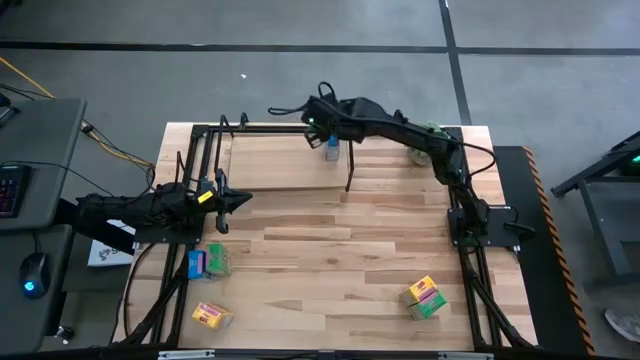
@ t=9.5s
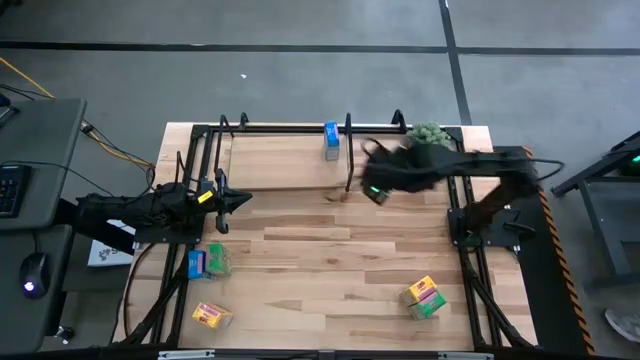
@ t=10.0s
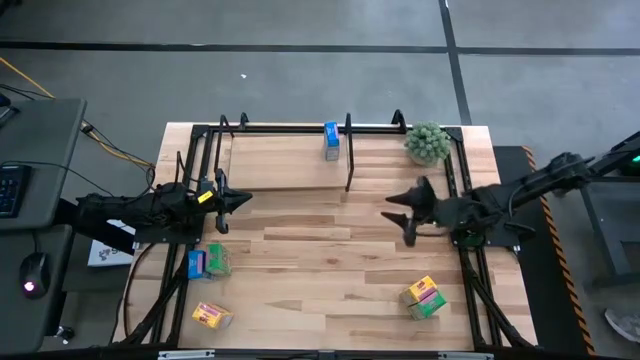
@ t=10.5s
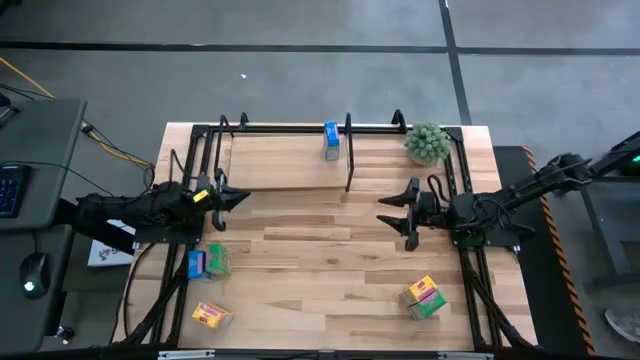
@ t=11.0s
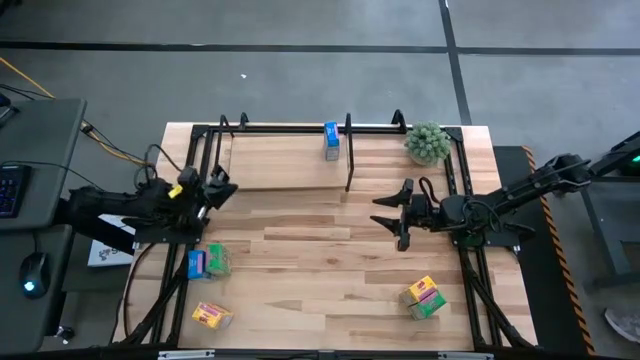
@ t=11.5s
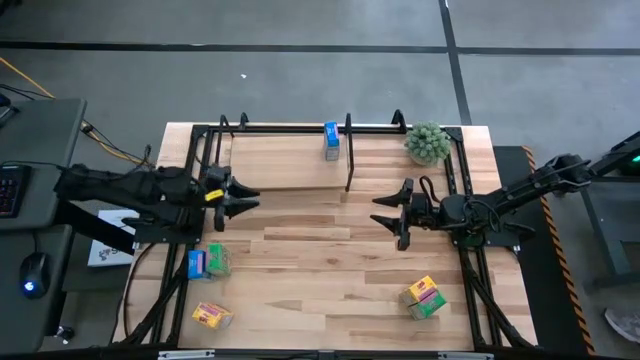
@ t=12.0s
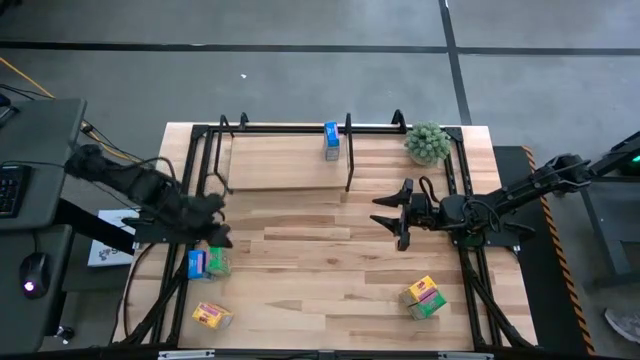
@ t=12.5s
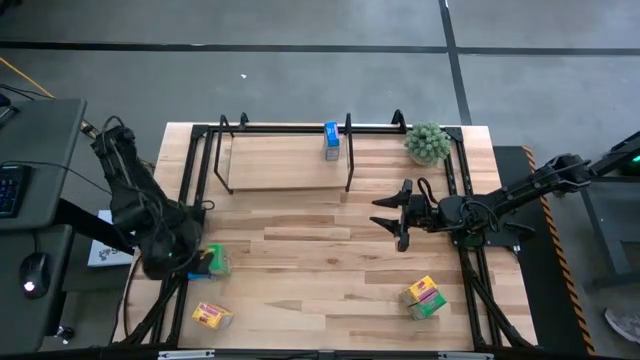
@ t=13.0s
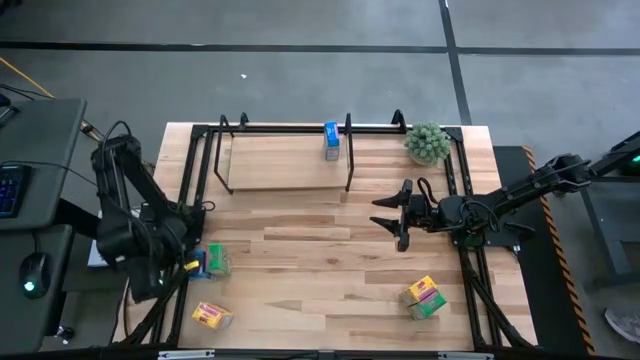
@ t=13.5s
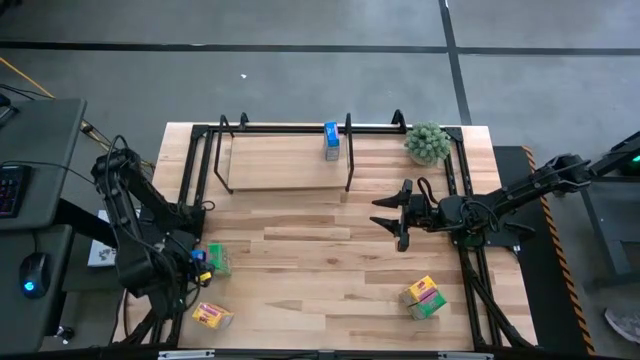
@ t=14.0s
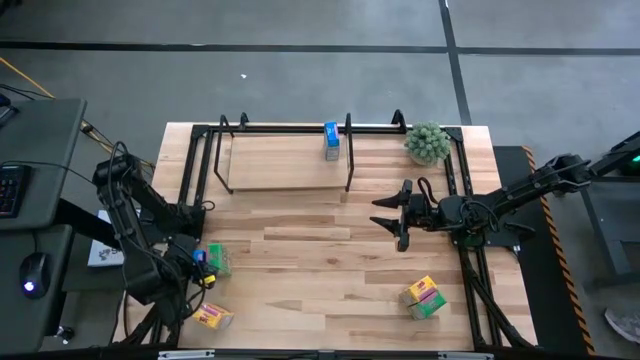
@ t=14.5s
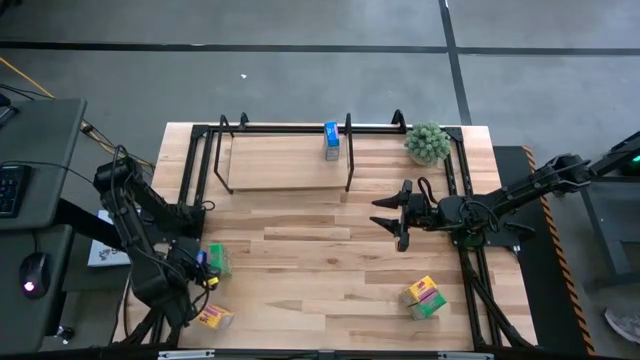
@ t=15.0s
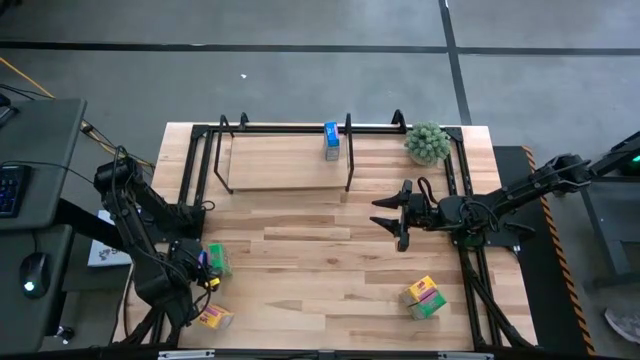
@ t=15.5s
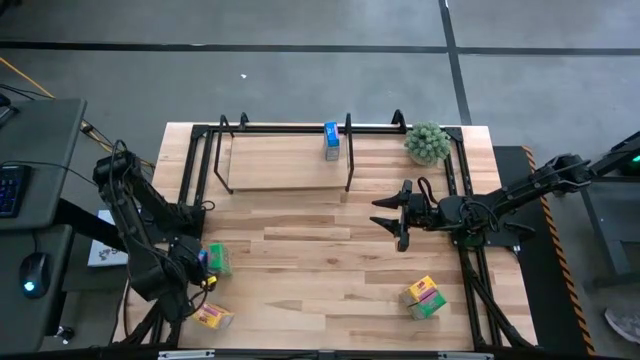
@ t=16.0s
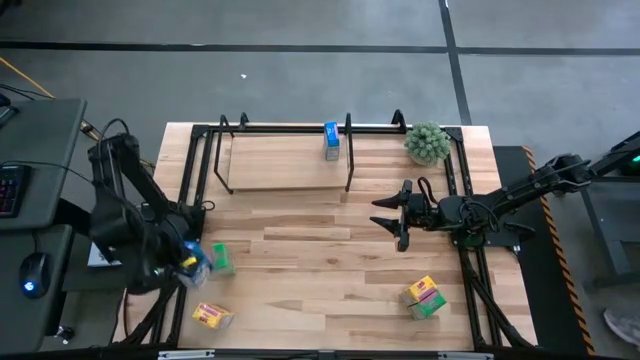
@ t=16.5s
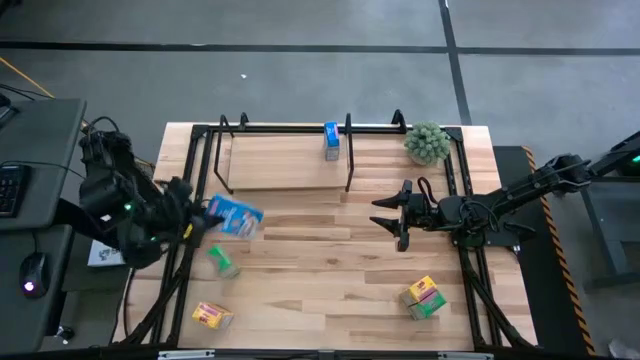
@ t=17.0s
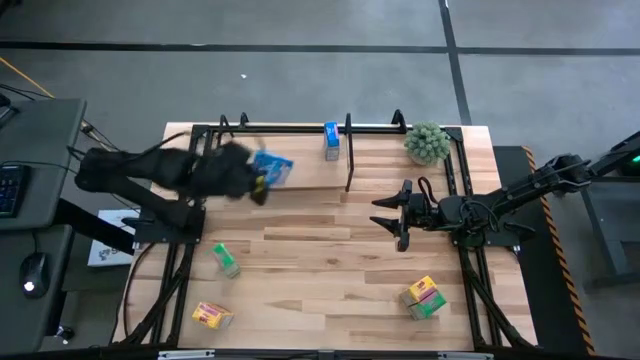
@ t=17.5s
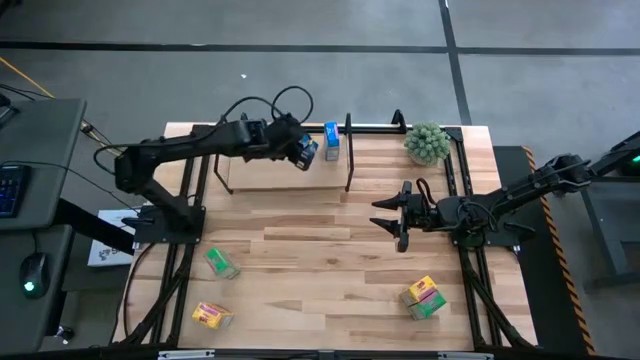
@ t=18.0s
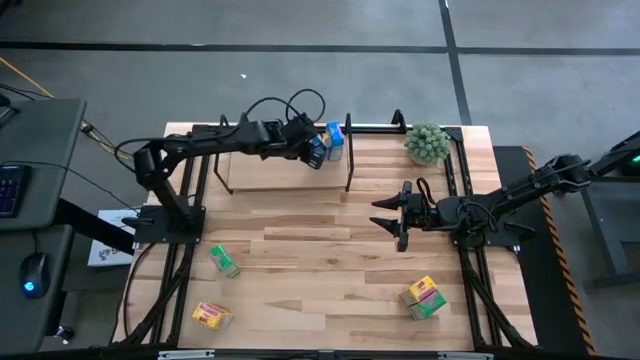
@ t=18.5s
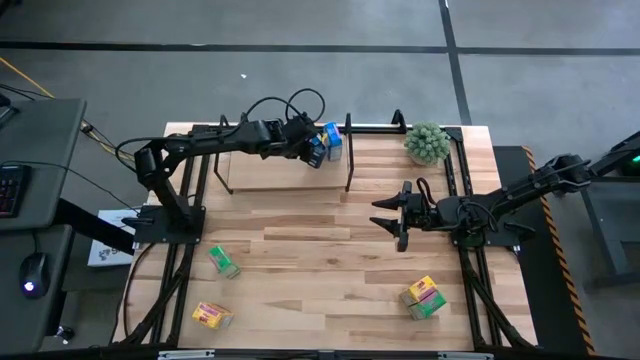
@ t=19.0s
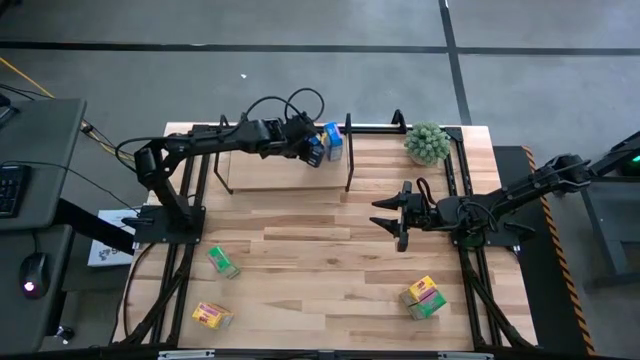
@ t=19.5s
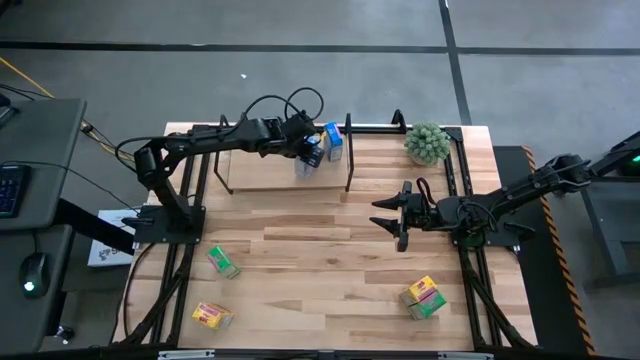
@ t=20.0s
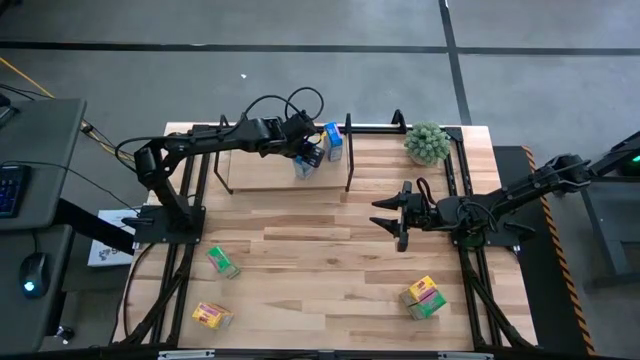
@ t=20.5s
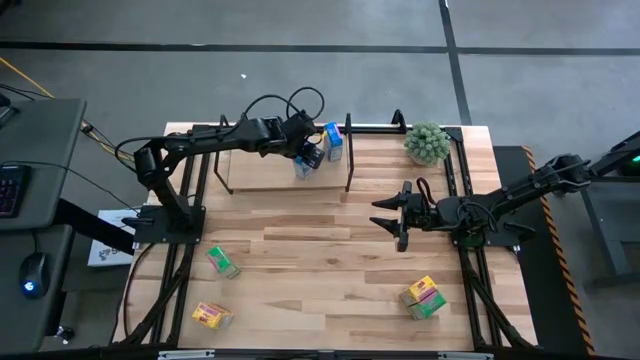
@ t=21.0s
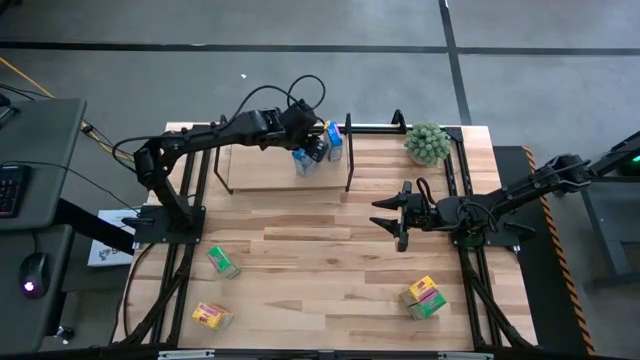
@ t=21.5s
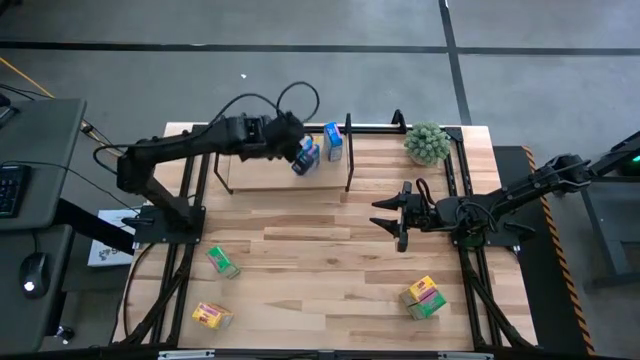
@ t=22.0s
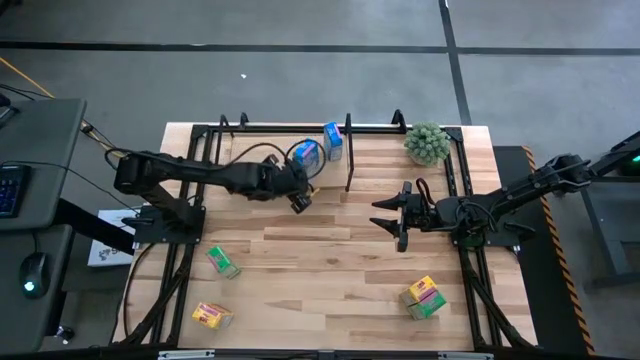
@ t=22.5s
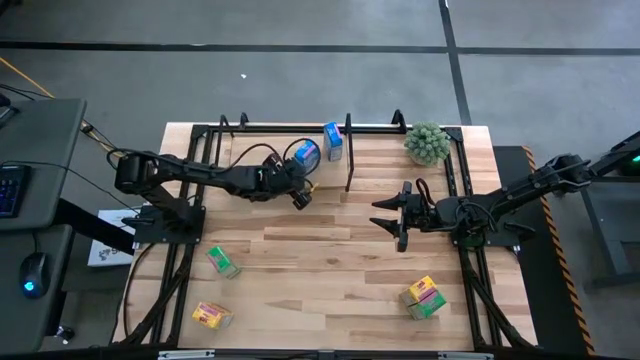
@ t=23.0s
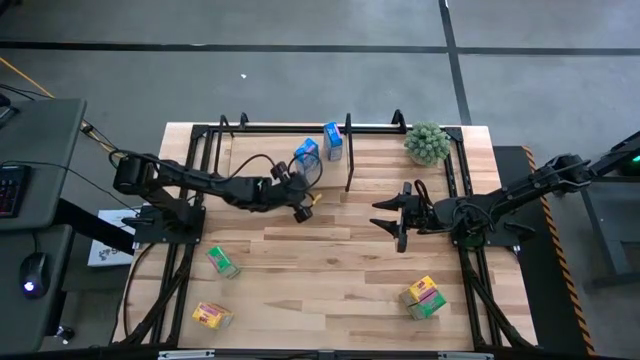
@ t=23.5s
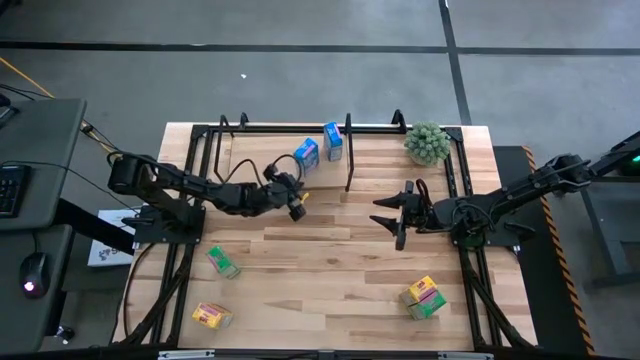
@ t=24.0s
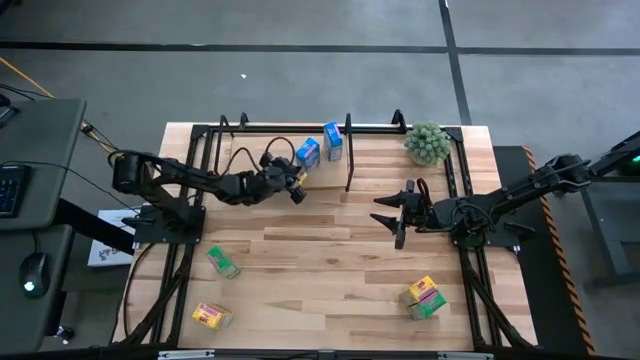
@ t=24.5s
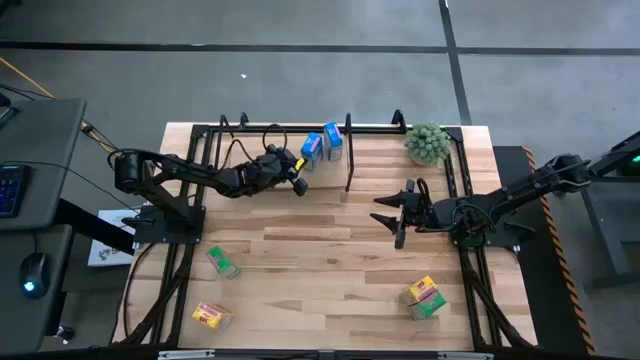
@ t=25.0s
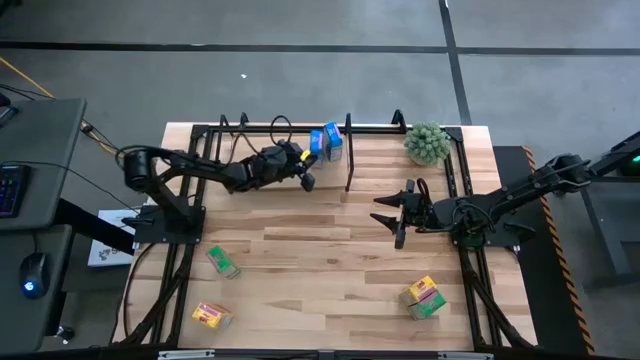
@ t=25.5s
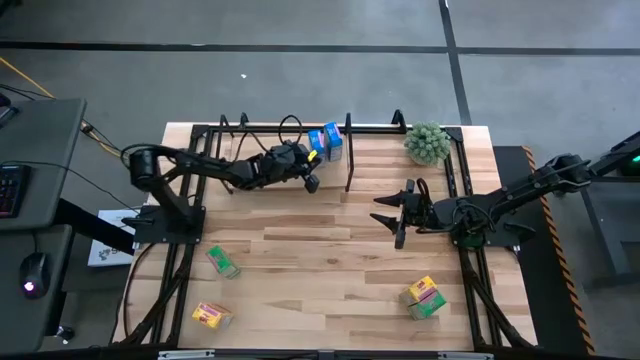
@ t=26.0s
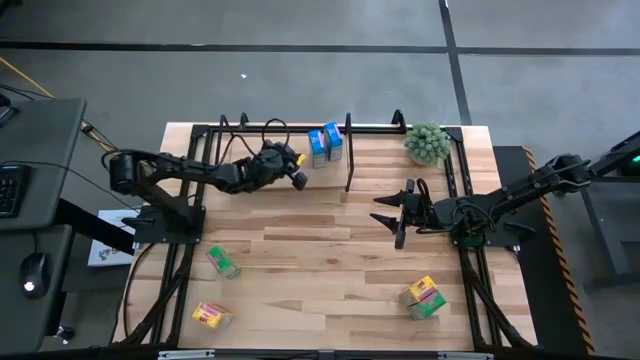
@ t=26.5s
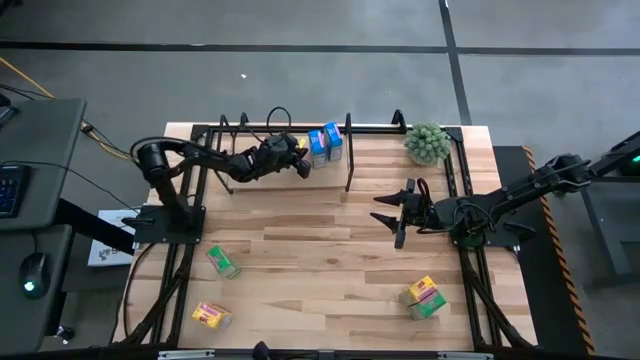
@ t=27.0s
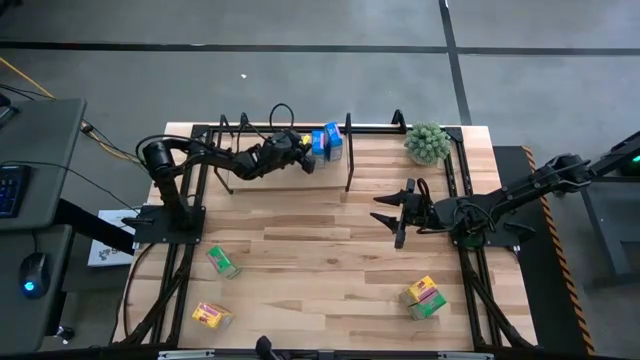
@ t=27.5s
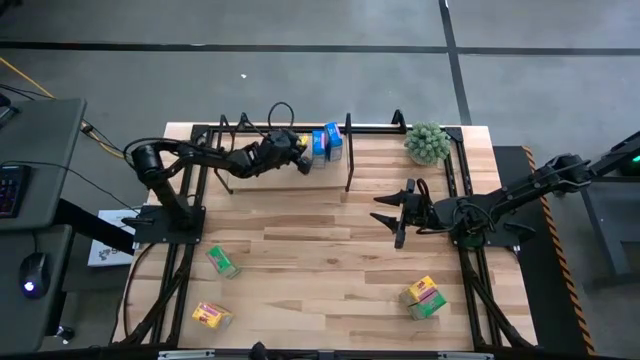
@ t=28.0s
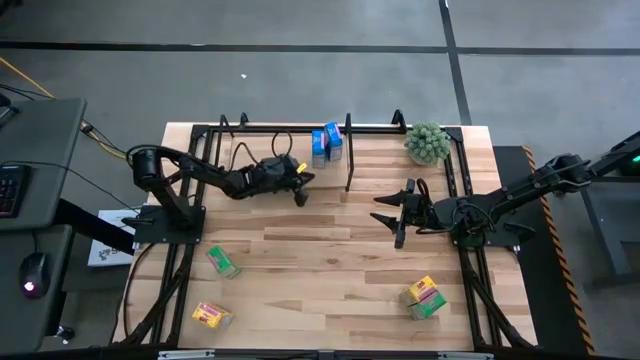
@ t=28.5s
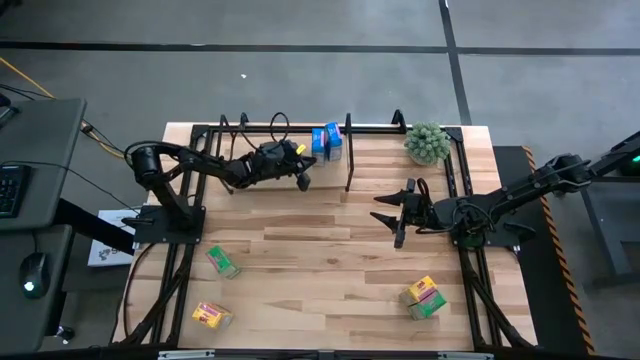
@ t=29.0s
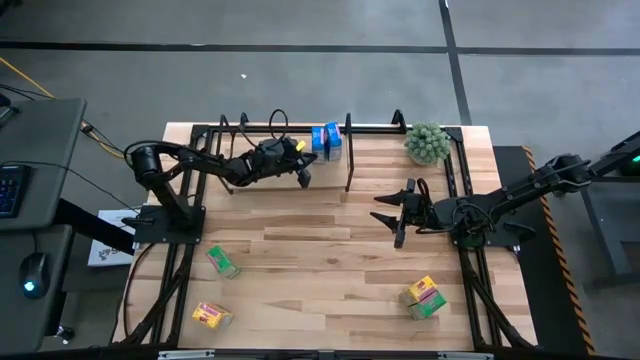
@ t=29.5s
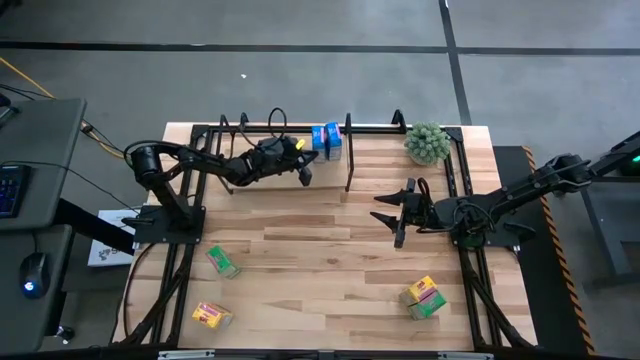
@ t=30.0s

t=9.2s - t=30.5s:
Task: Stack cereal on shelf
Put the blue cereal box on the shelf aligned with the blue cereal box
